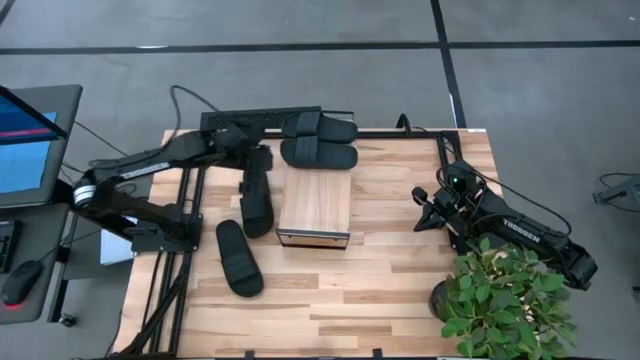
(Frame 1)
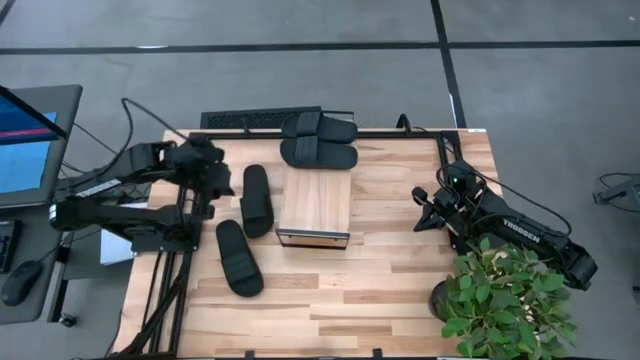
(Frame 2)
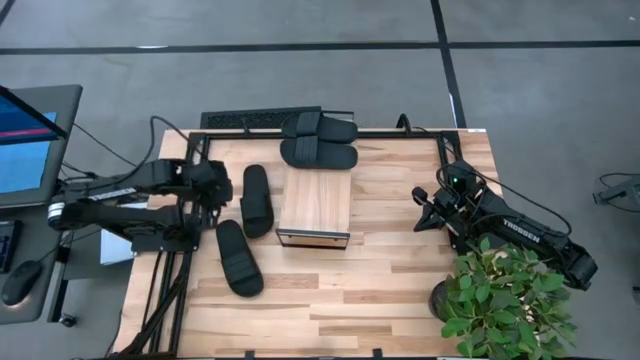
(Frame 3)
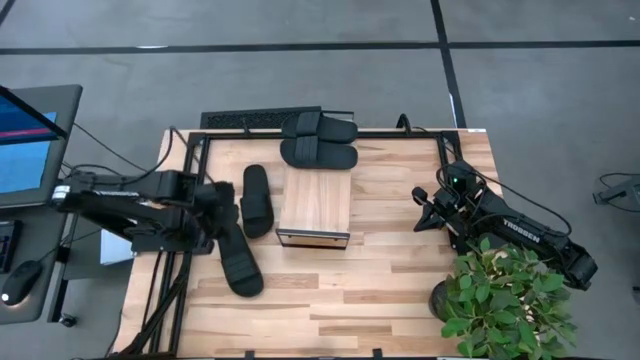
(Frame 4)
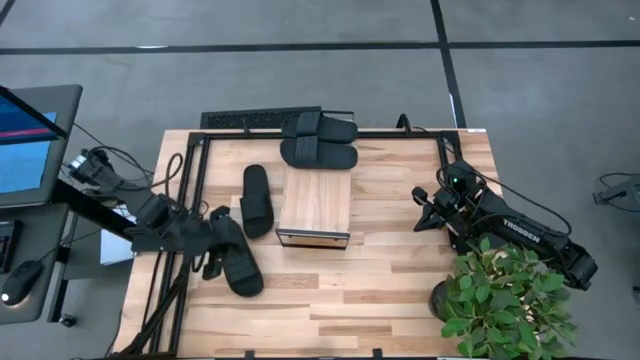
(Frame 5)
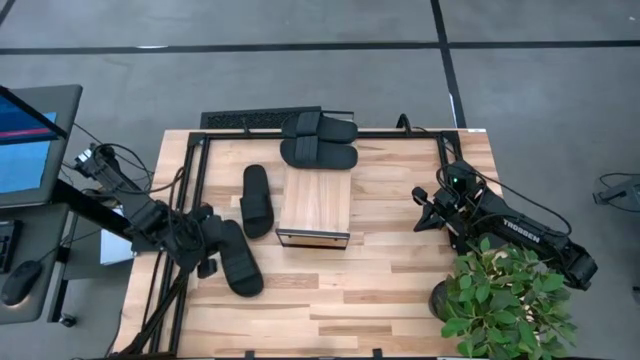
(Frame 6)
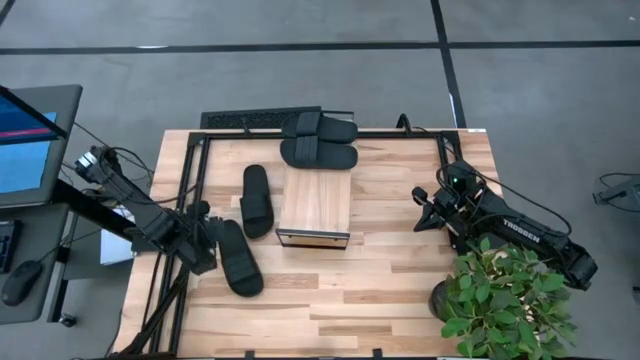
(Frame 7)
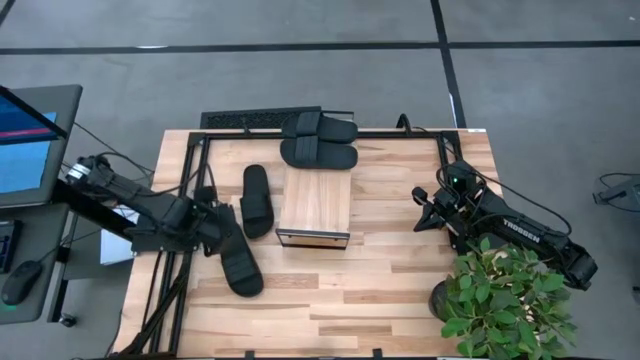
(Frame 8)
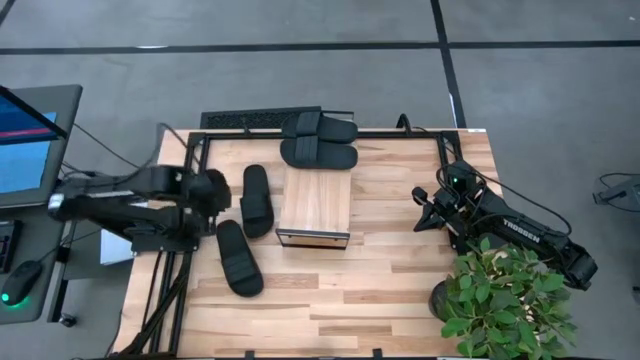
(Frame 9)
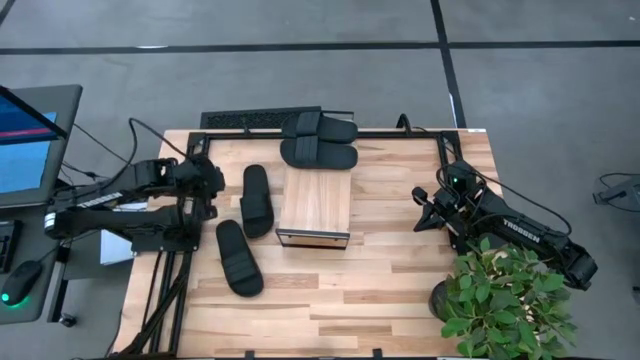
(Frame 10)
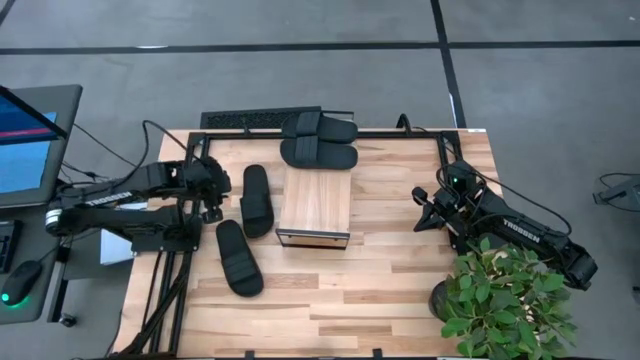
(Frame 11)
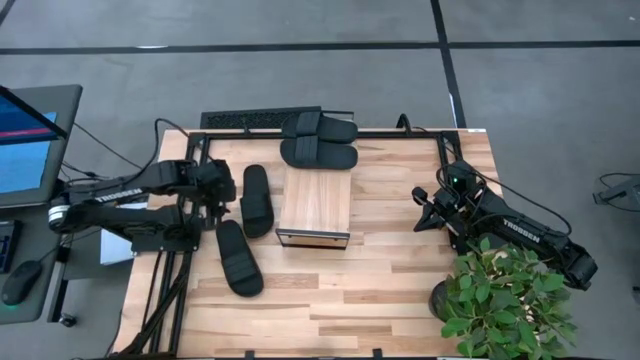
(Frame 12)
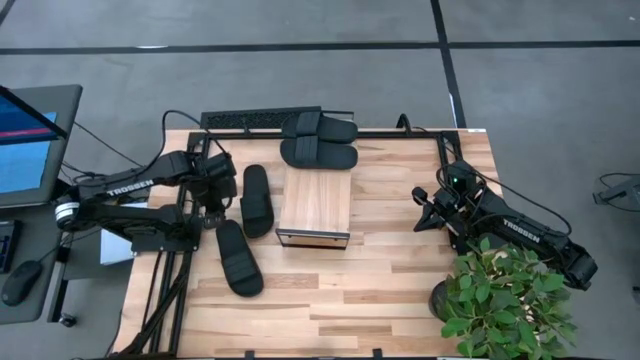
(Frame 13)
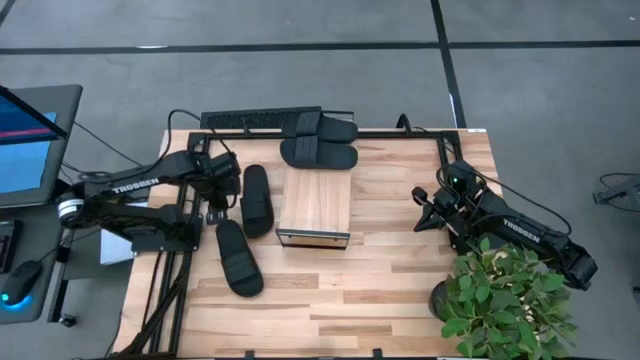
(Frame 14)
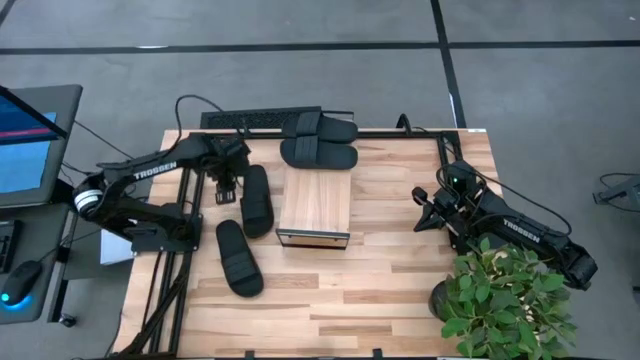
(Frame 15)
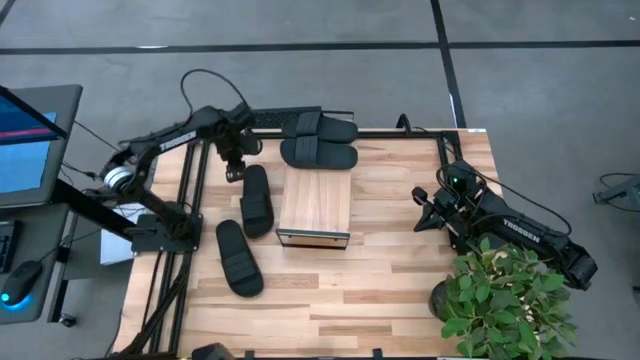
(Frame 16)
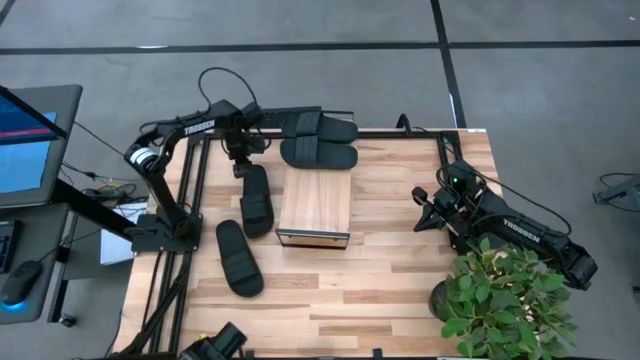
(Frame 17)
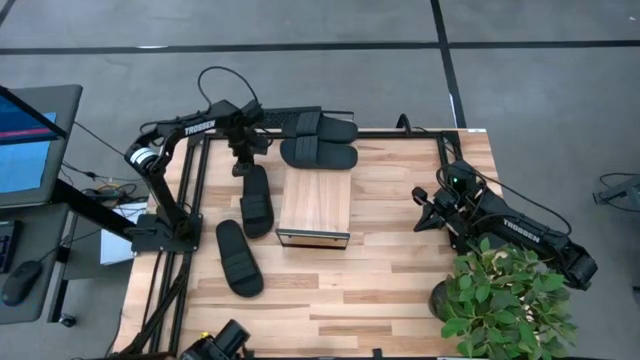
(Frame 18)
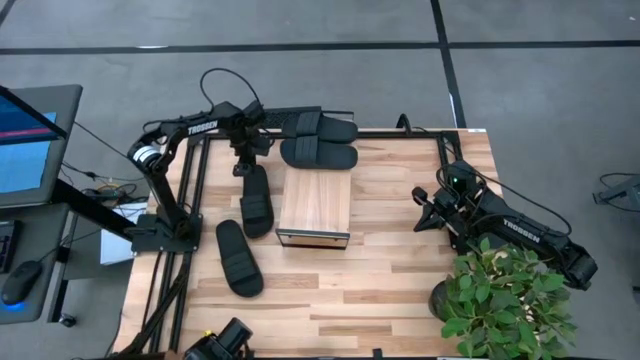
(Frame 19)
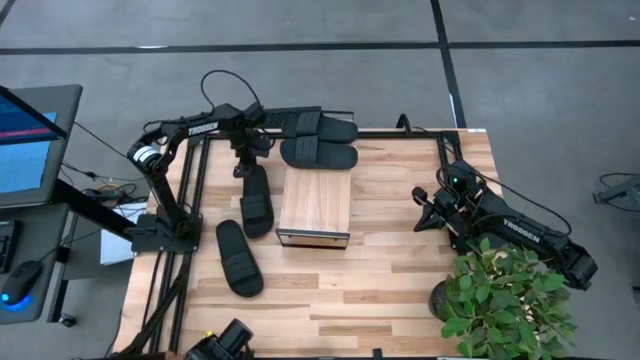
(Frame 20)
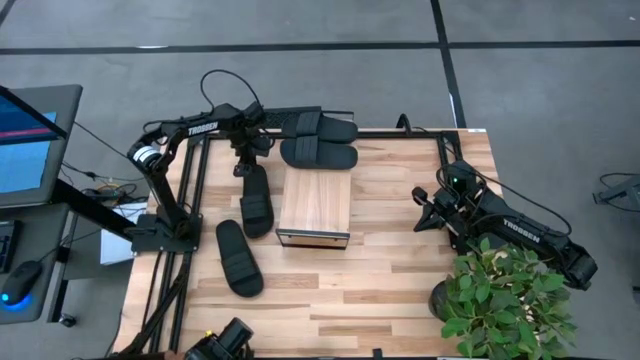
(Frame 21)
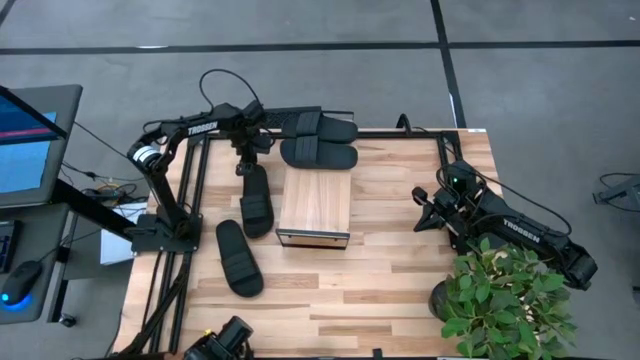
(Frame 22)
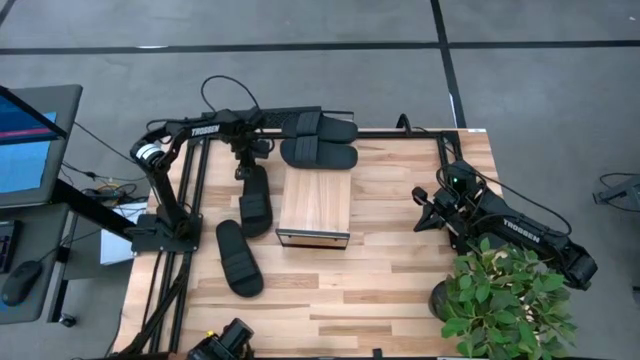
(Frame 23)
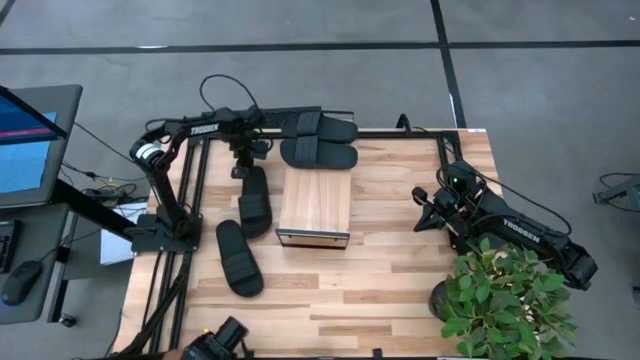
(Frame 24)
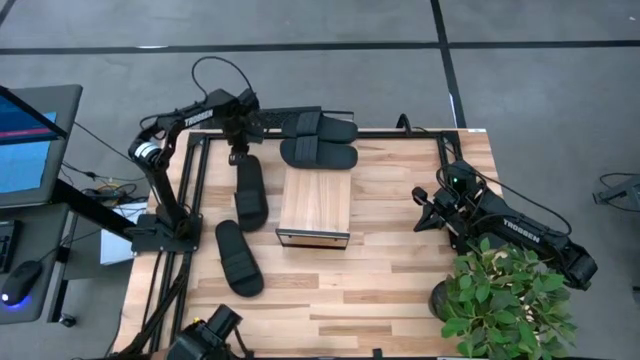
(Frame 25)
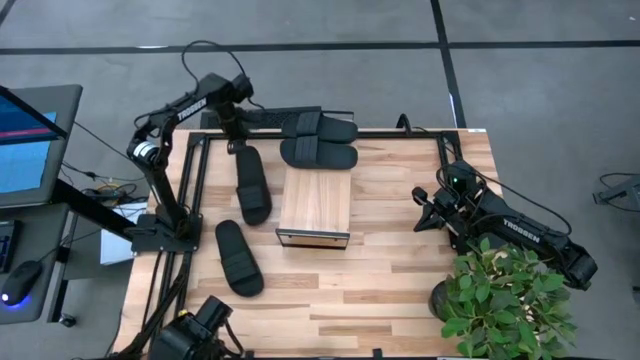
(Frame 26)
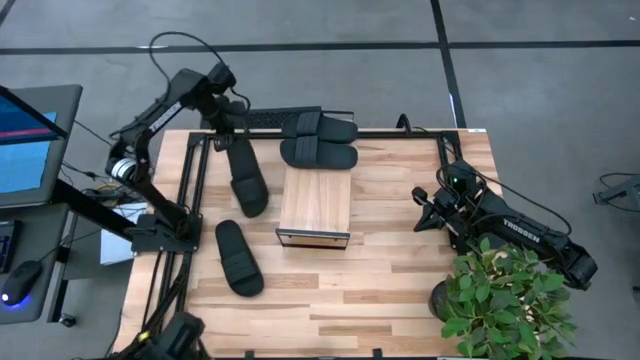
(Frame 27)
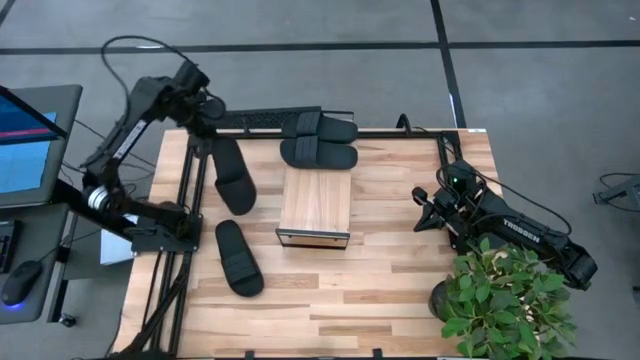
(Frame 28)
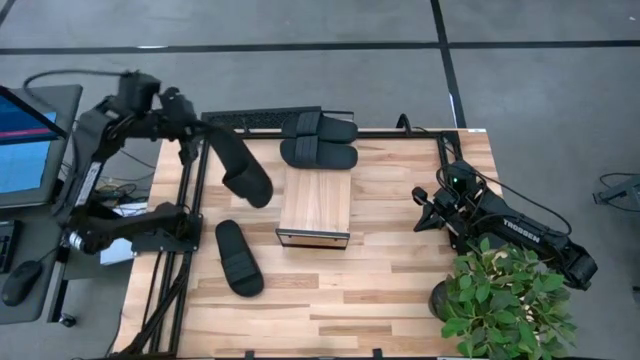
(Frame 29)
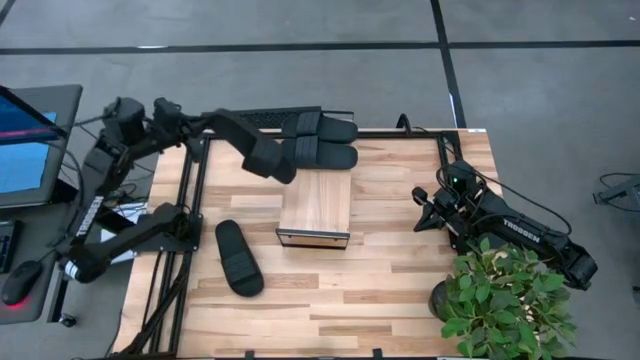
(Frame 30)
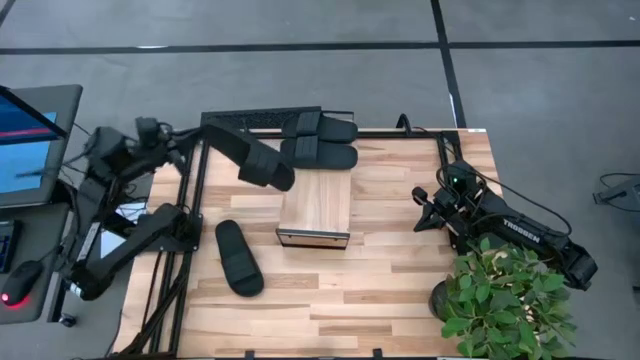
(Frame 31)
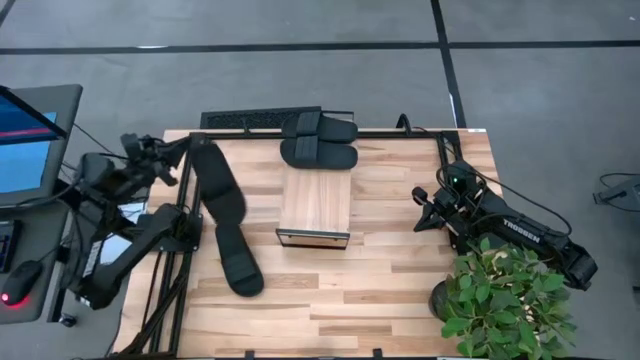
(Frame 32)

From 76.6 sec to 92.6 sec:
Task: Pick and place slides into the shelf
Put the black slide on the shelf
